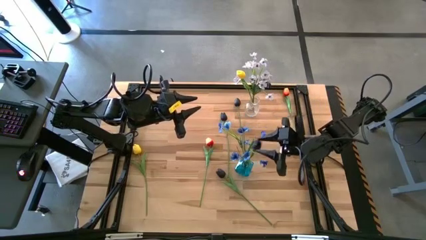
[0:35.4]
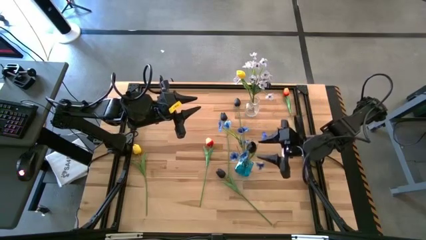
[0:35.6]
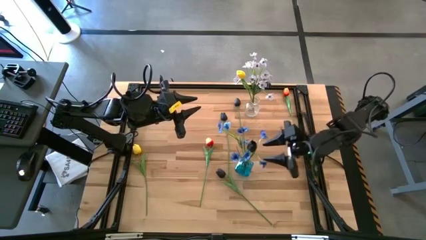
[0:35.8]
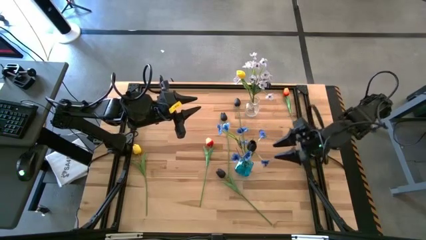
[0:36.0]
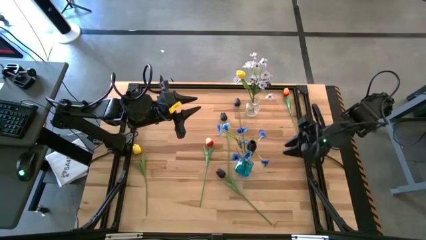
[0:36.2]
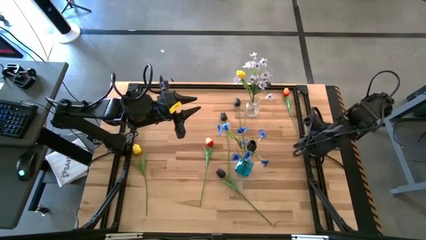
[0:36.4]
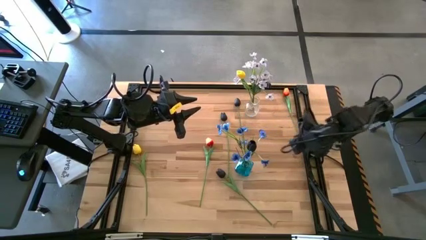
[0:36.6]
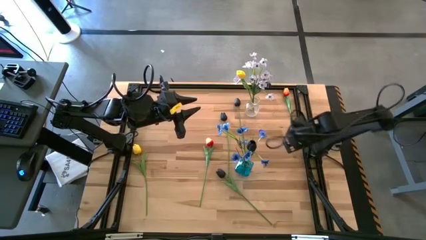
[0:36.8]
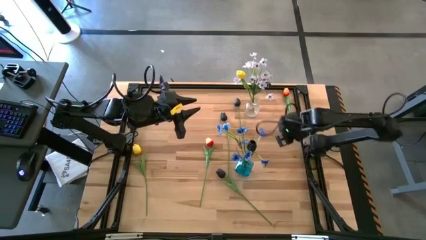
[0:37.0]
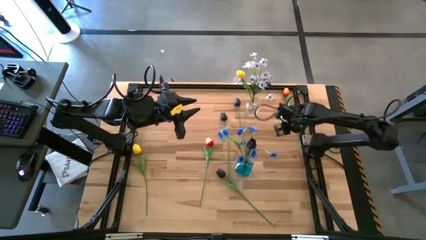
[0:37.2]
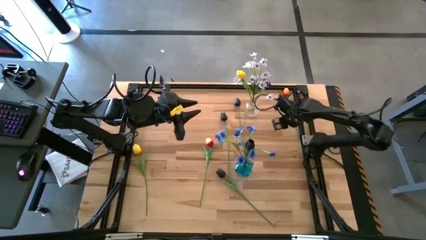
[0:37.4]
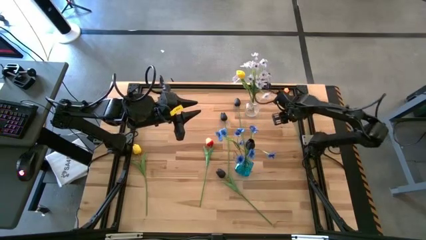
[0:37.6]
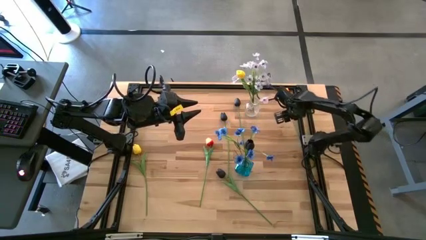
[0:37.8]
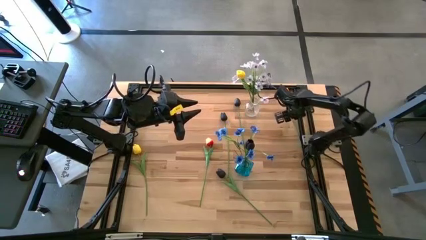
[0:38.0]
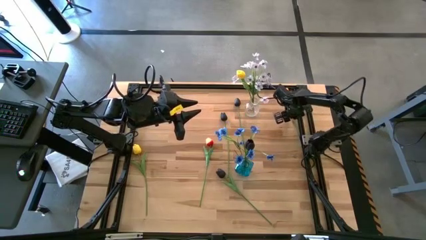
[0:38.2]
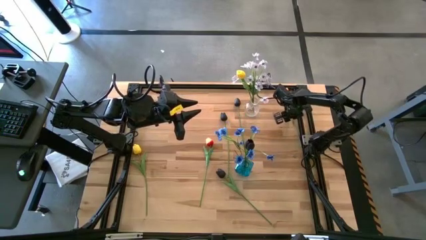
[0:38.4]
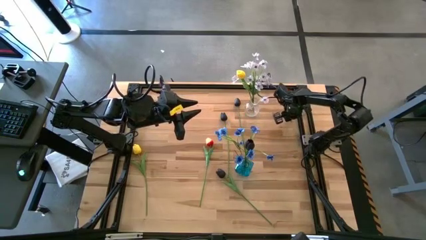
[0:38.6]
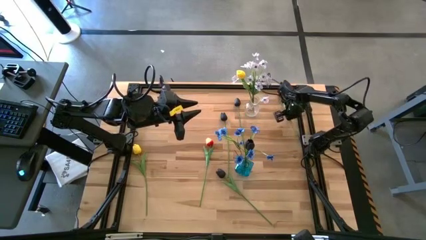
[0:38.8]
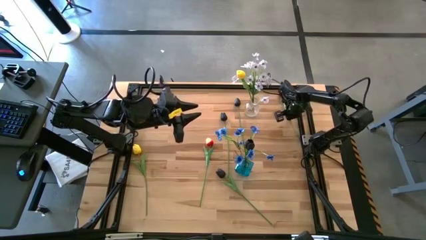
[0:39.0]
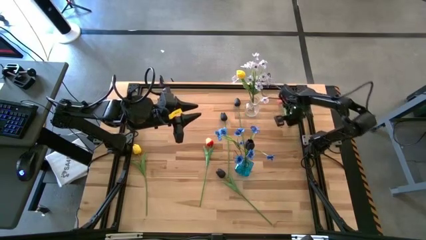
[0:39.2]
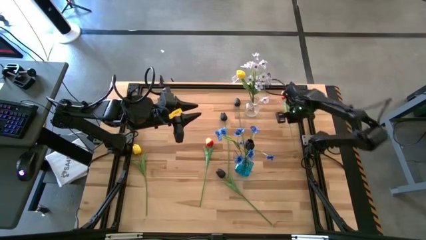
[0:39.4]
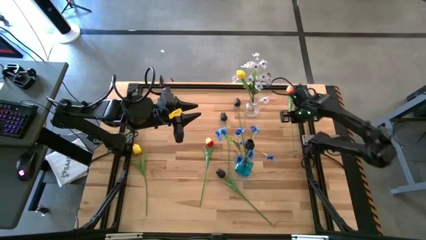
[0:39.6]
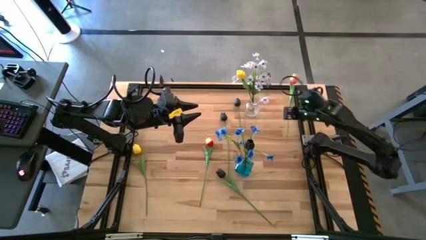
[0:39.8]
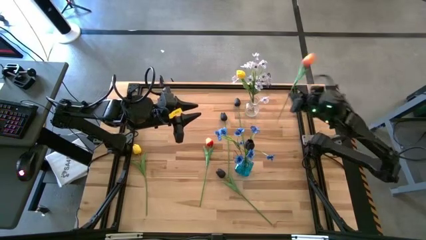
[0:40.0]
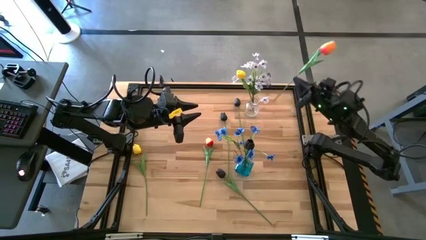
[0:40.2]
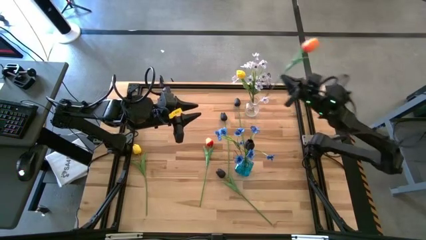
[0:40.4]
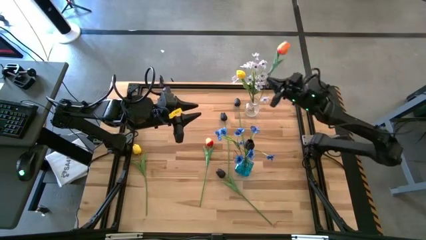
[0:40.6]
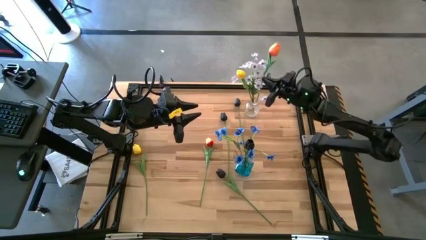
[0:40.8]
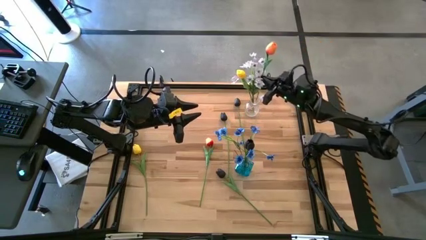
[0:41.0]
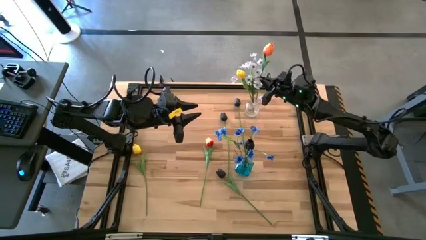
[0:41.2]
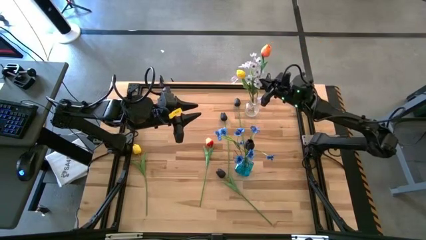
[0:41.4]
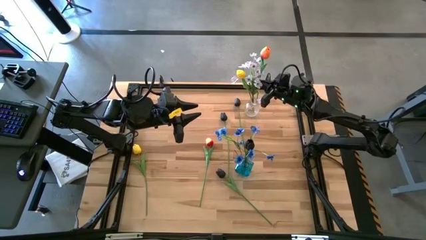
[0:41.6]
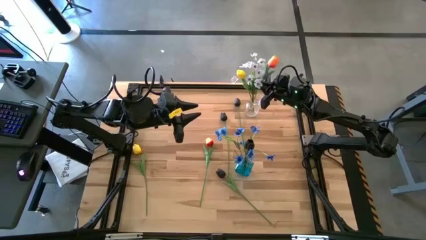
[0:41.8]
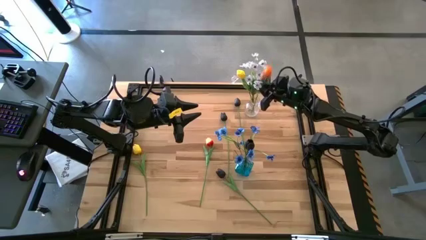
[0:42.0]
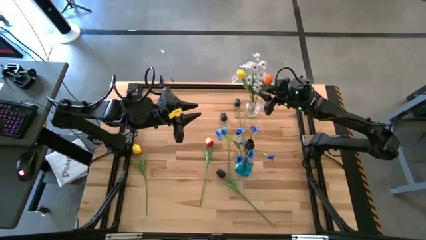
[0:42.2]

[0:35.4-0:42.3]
Task: Sort flowers into vase by color
Put the orange flower into the transparent vase

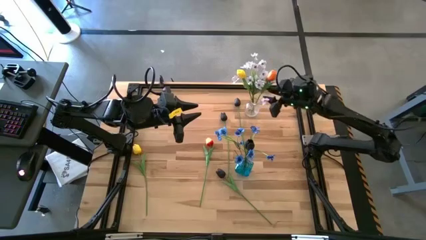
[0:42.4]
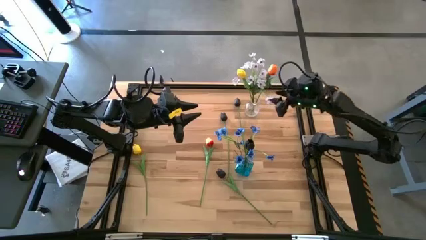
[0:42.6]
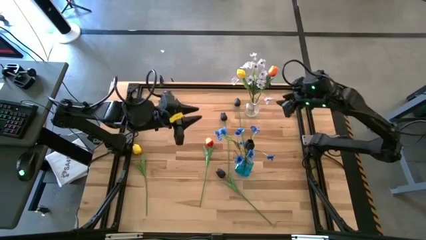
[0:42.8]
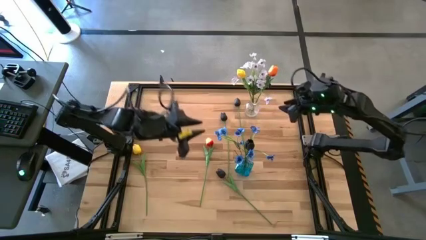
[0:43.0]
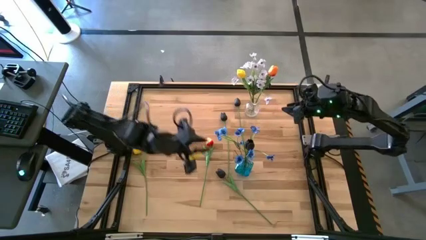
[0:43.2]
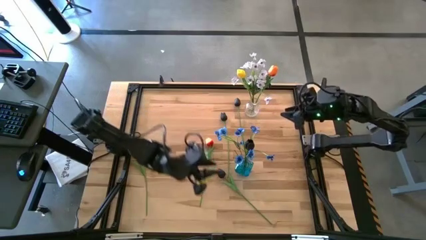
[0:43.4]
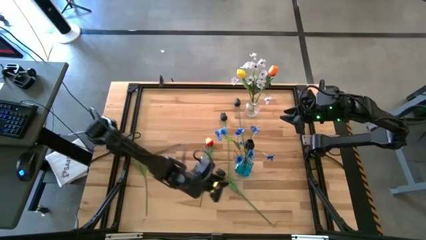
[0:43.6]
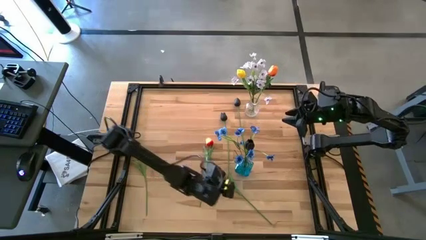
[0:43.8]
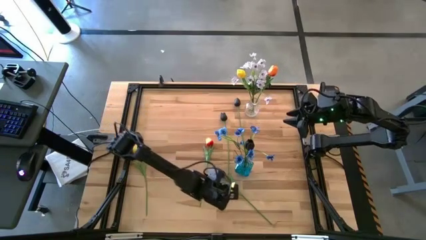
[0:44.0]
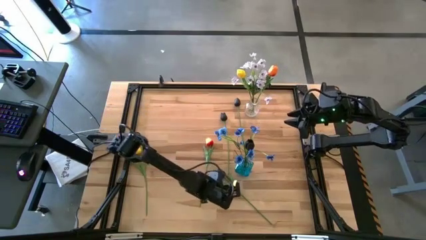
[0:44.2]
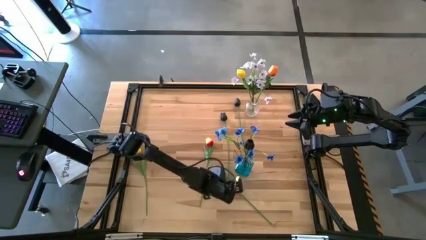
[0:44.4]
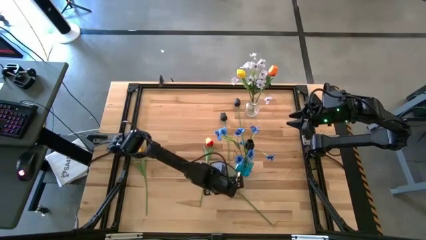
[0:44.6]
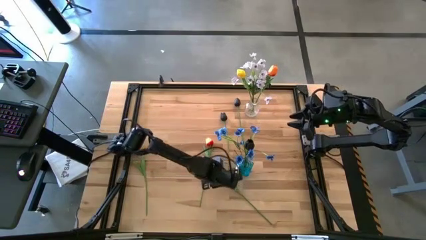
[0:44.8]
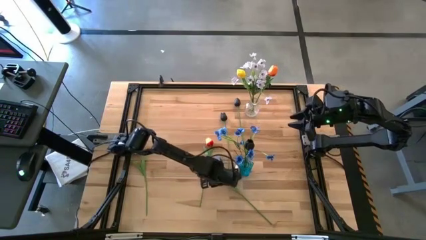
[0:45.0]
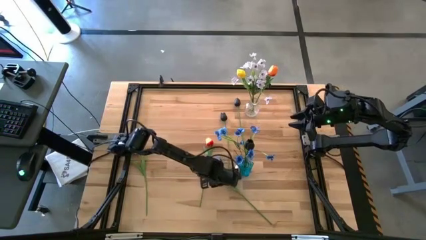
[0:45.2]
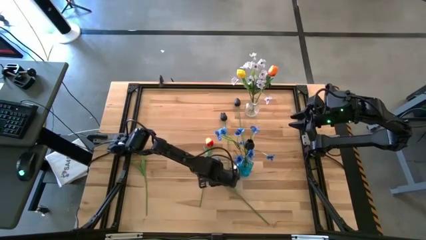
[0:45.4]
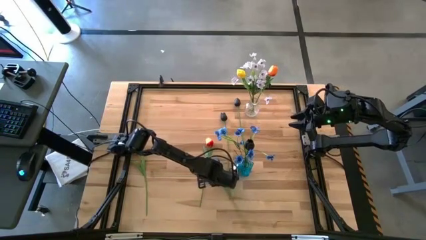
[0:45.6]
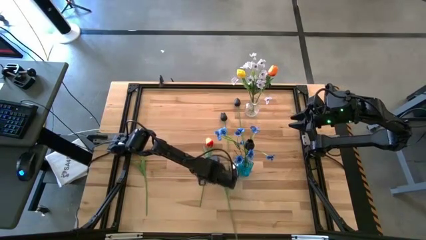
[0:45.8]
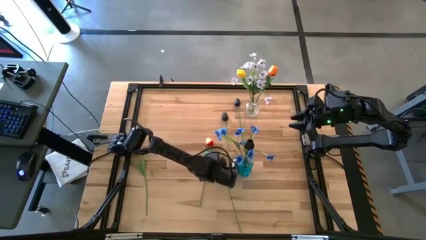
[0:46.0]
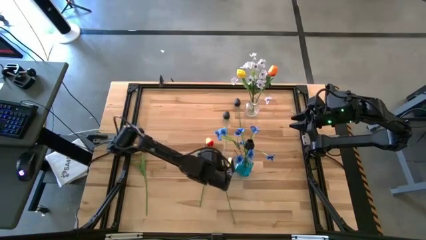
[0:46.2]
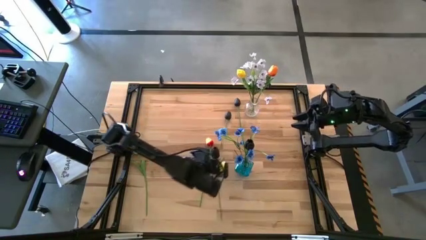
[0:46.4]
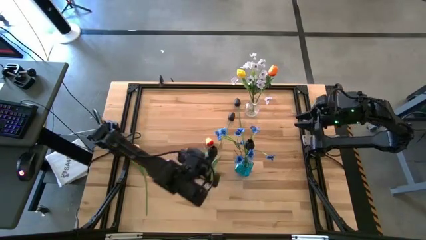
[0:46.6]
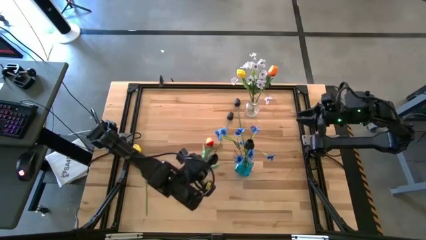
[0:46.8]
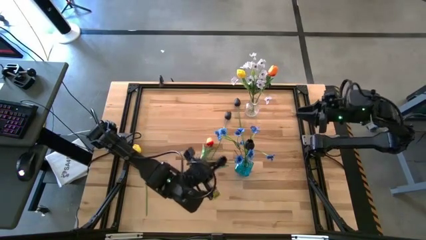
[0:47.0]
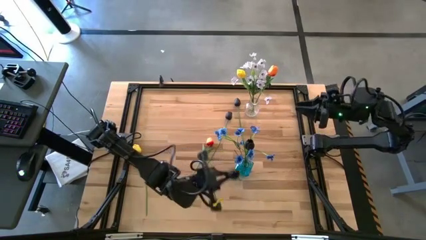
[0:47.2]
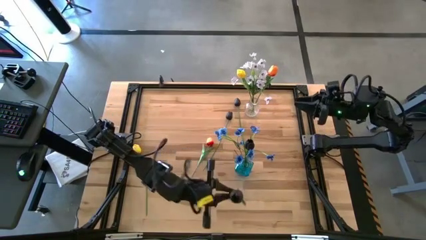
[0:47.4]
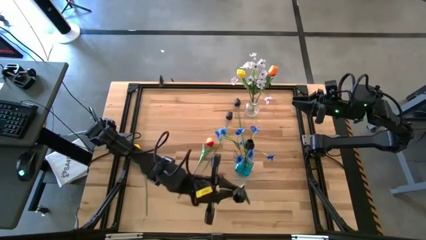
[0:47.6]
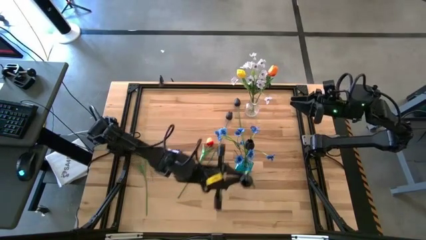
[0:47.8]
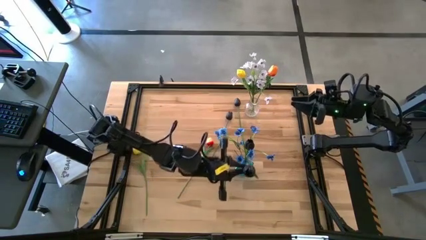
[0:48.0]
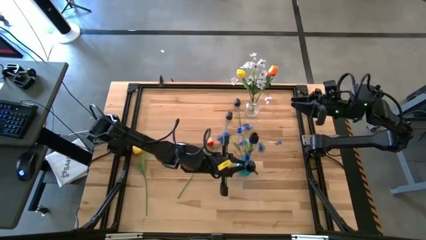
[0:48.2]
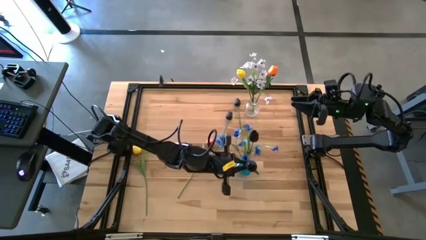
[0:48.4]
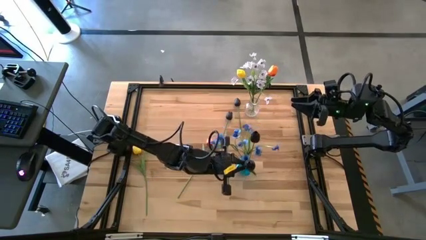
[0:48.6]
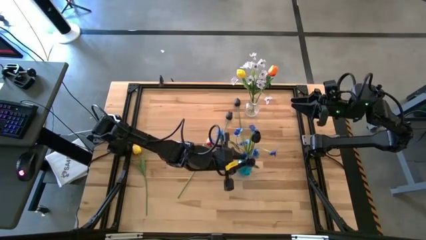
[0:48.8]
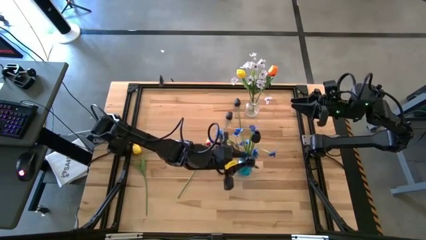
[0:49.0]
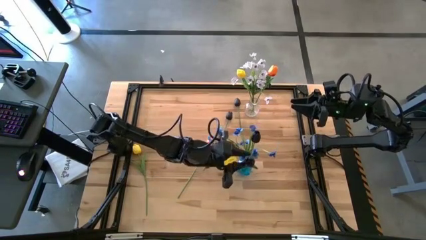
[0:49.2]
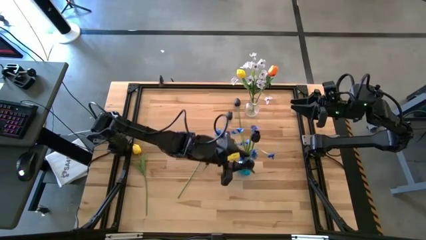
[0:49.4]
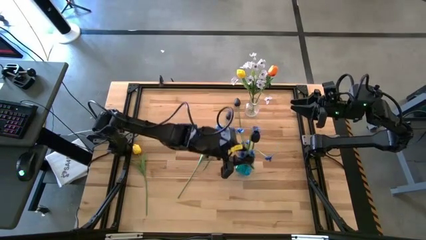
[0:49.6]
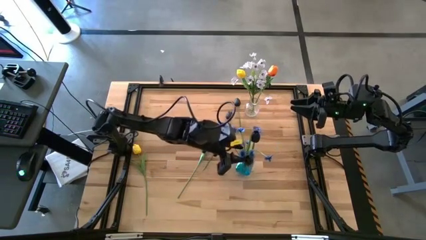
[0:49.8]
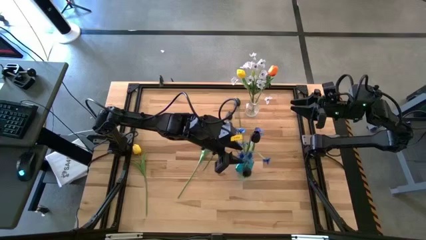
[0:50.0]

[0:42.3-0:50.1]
Put the black flower into the blue vase

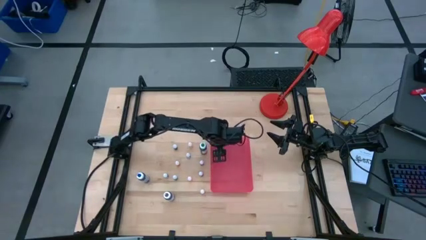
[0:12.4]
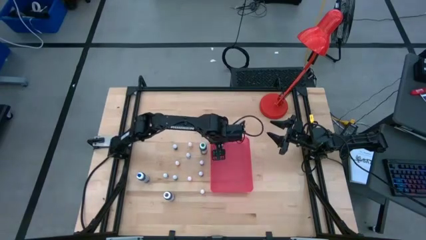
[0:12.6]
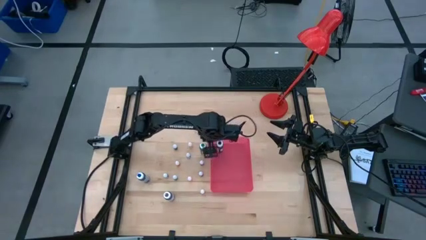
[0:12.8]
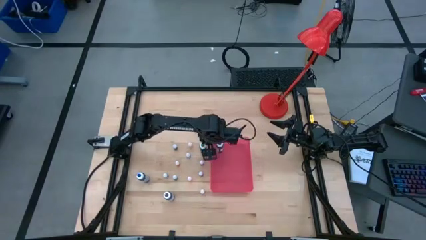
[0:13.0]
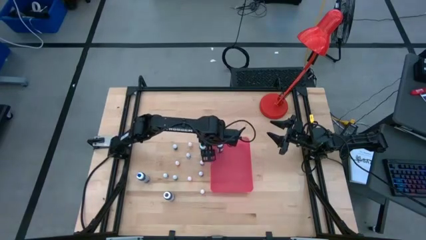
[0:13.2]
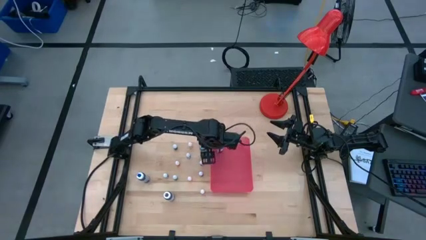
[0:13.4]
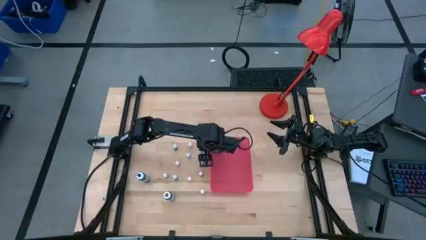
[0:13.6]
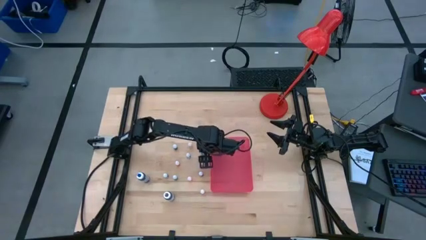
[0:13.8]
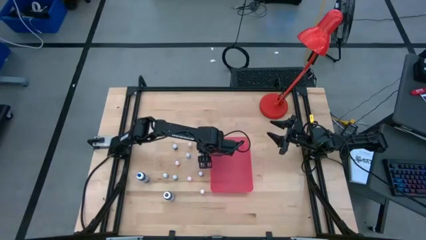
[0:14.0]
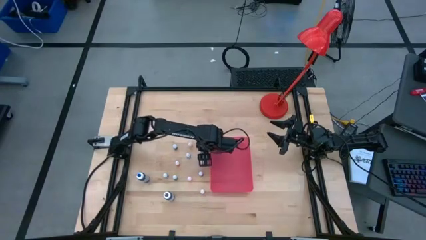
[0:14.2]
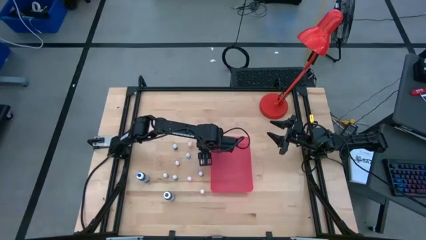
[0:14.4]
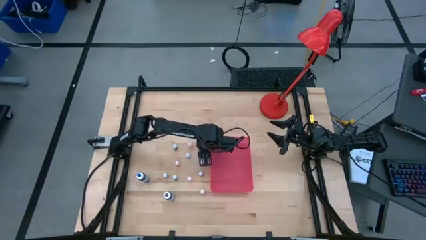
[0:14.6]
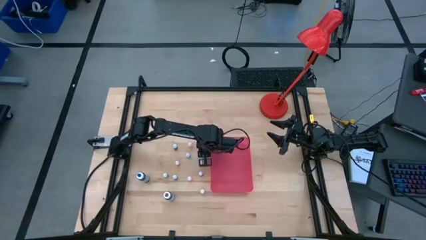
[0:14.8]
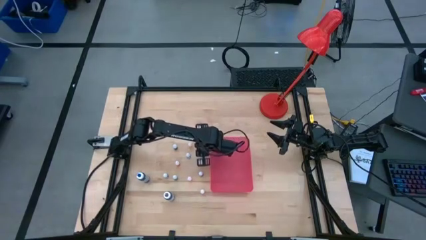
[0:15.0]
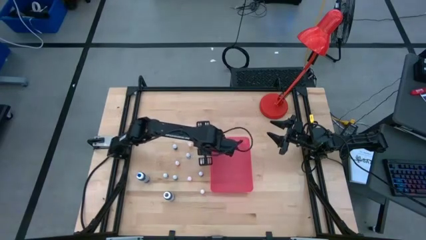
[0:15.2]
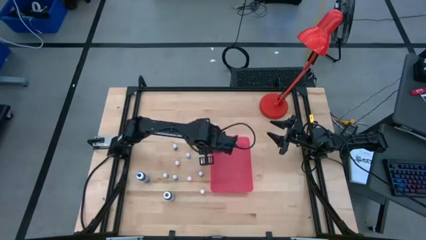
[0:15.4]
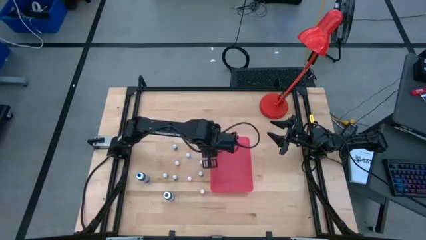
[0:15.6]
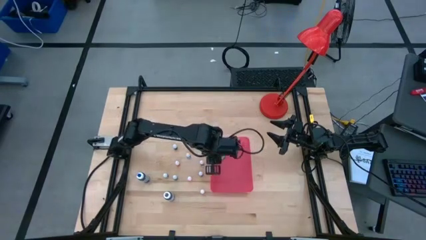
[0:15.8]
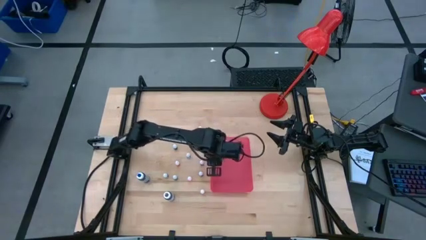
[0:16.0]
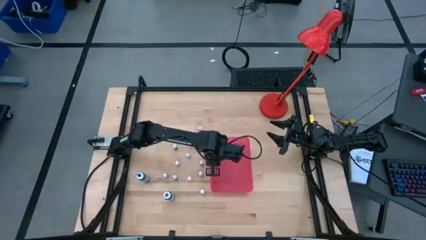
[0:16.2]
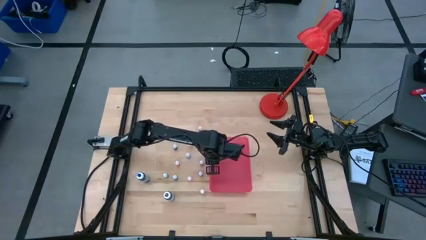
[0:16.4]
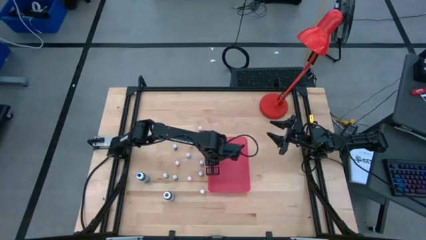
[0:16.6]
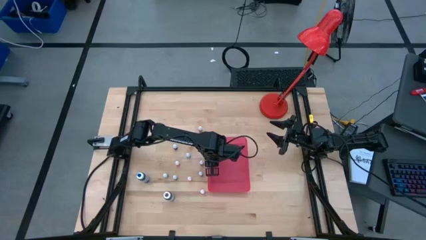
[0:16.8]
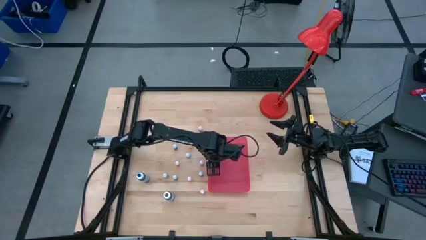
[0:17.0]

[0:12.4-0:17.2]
Task: Pick & Place food coloring
Put the big green food coloring bottle into the red bin
